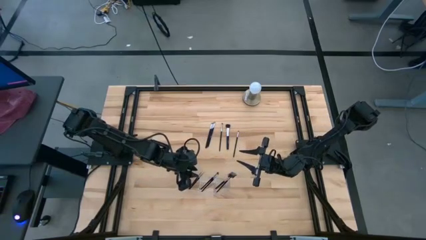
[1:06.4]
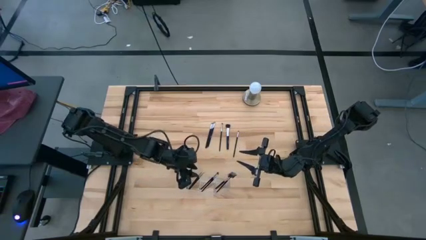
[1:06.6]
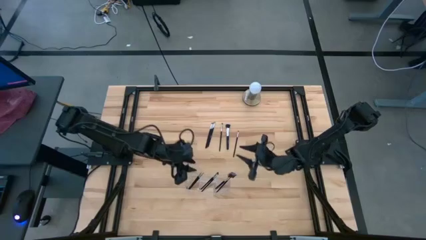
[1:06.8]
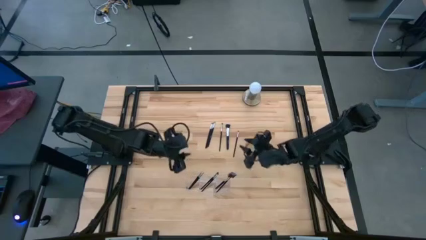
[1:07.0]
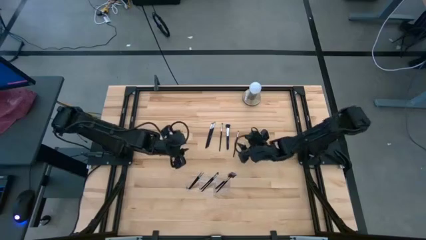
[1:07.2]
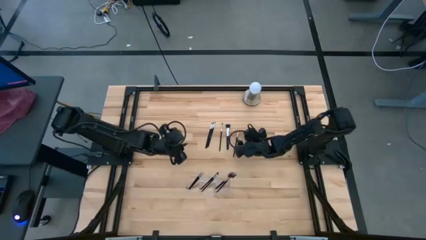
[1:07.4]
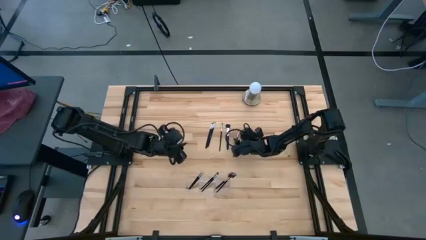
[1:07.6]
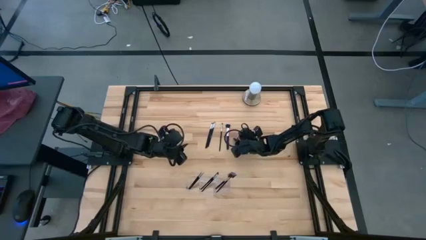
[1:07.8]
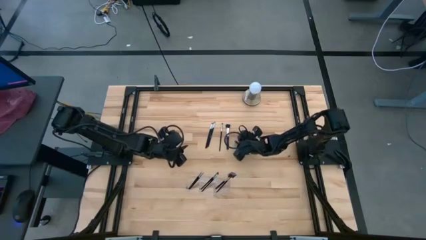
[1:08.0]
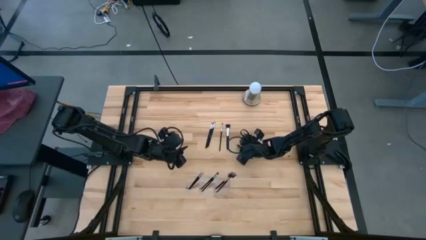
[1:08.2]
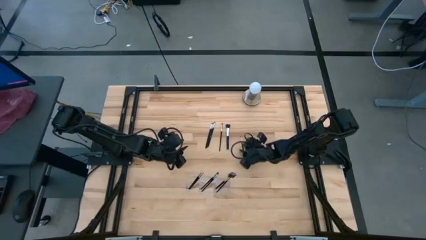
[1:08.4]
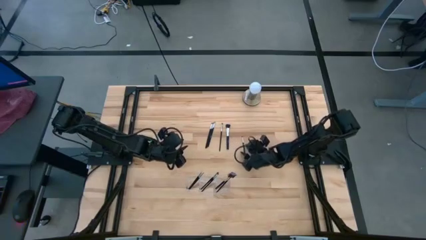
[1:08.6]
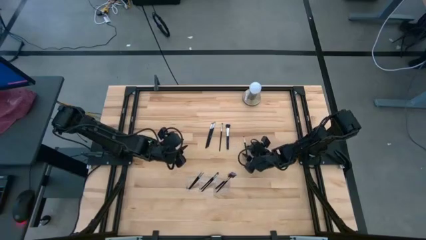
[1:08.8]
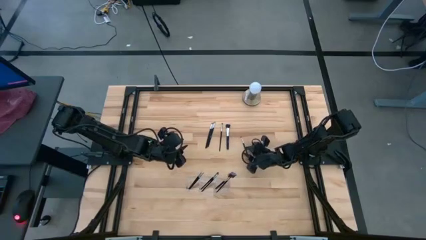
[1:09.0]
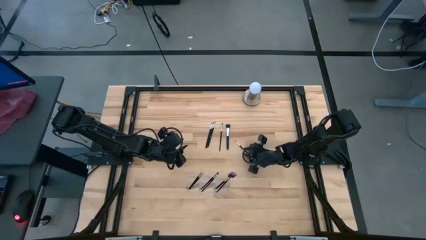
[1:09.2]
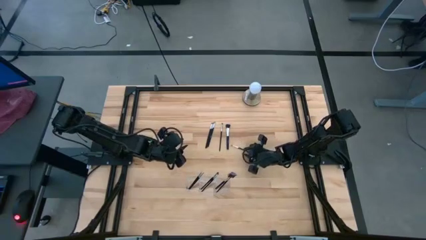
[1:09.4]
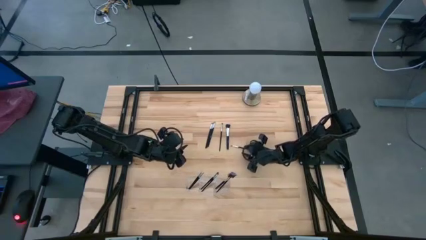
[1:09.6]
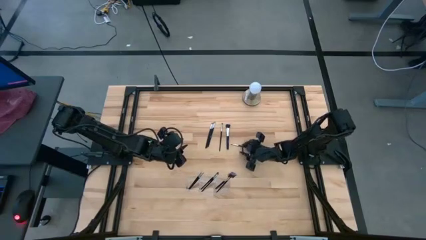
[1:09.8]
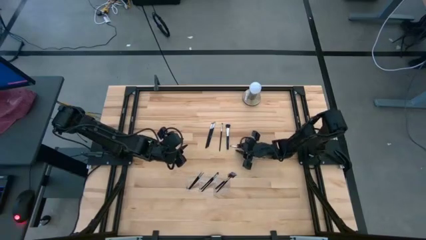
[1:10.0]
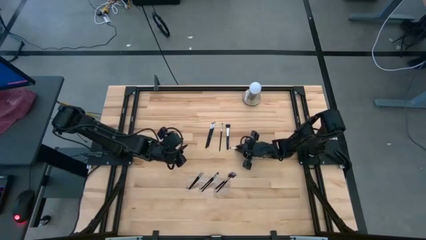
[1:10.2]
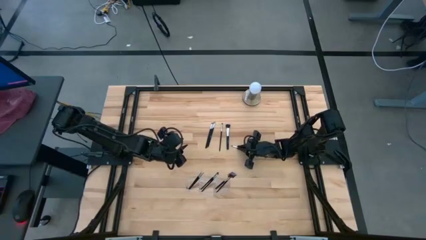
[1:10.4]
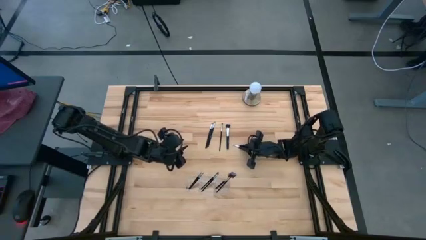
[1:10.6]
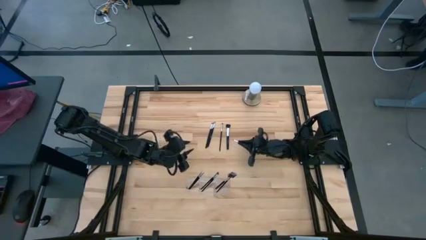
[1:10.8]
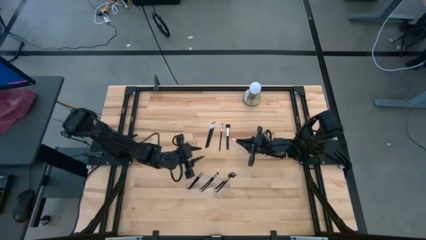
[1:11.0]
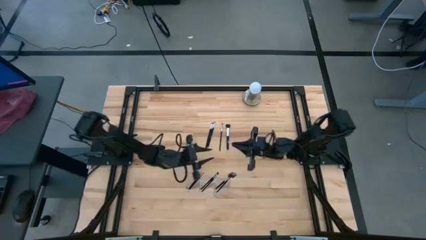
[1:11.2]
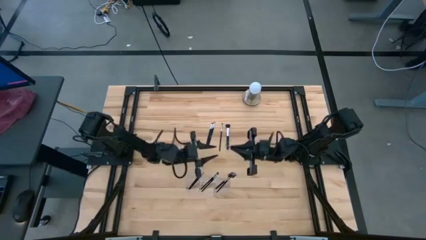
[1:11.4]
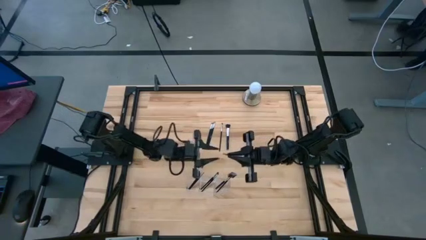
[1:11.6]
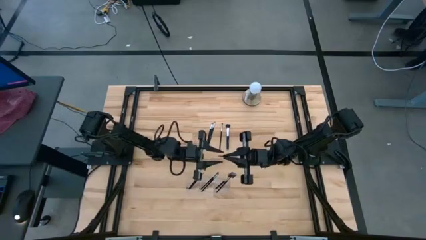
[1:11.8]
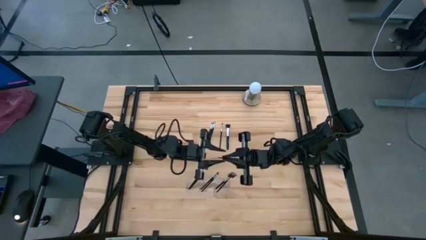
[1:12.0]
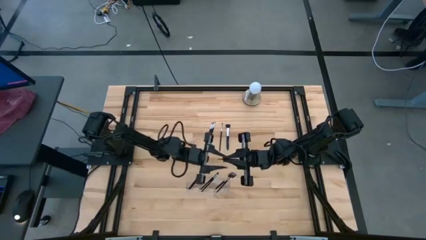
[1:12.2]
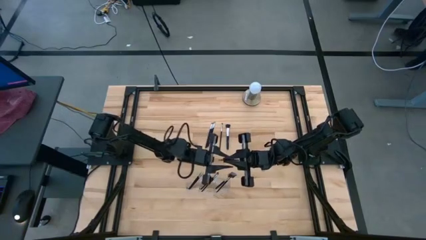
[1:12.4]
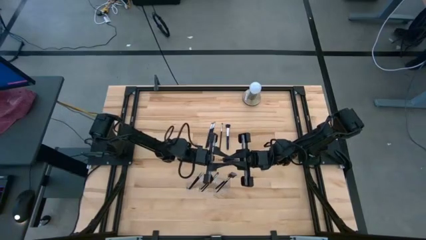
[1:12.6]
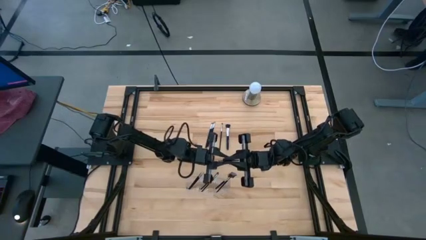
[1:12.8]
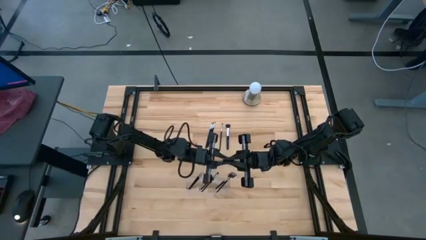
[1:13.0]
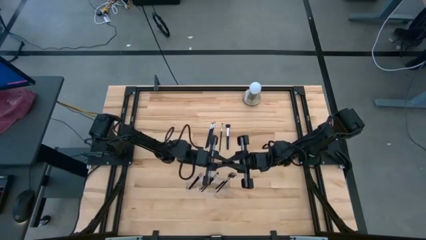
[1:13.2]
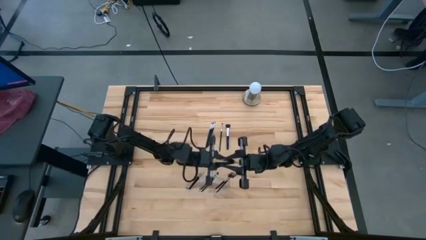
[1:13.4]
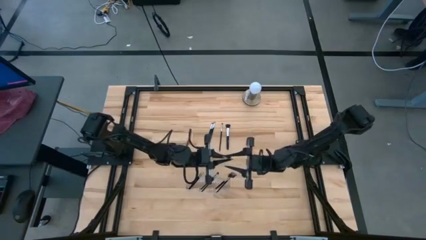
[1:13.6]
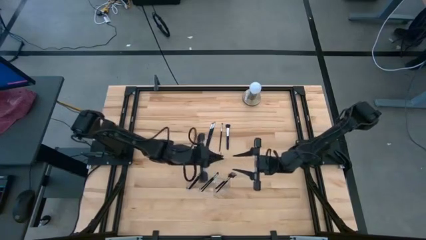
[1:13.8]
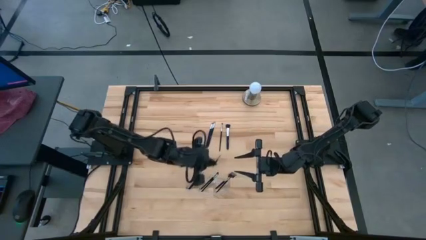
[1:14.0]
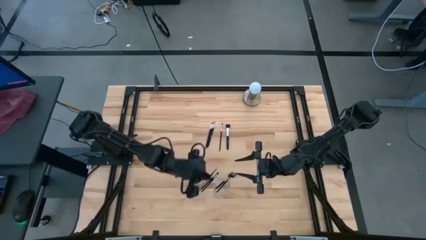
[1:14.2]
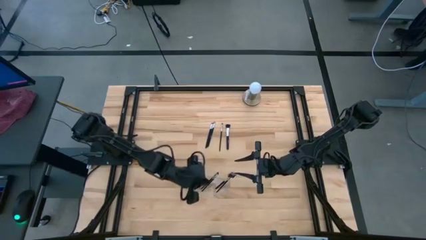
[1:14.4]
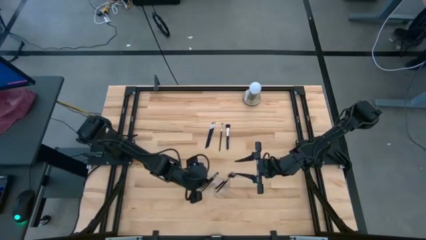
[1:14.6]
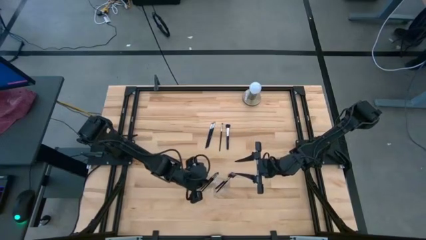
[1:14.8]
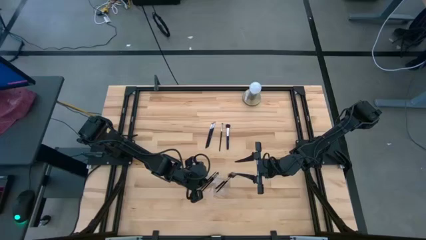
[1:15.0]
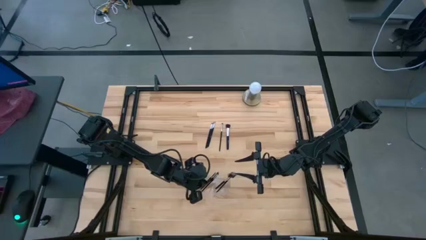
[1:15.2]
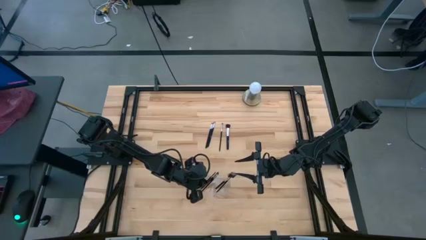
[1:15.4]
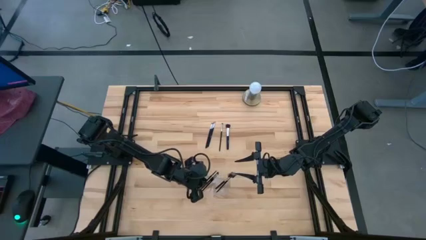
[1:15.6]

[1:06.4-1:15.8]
Task: Put items in baskets/containers
Put the black eyeshadow brush into the transparent organizer

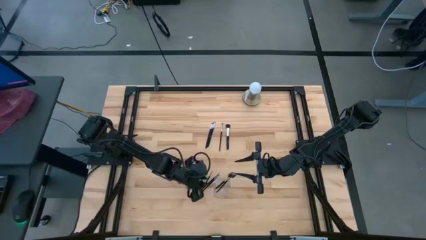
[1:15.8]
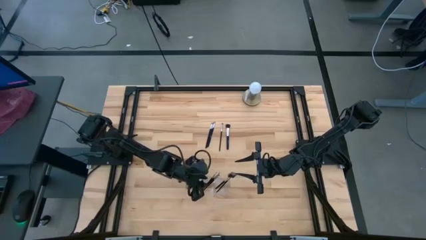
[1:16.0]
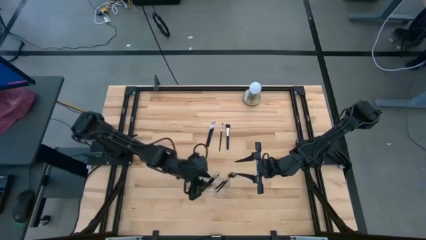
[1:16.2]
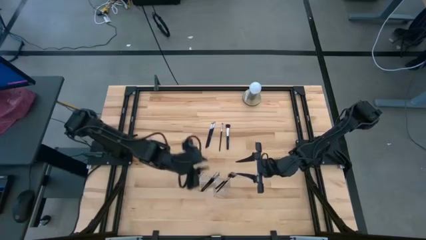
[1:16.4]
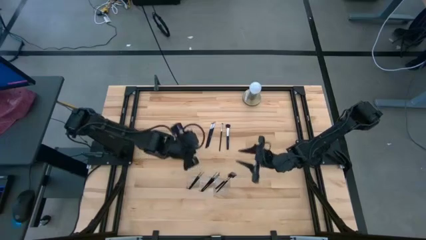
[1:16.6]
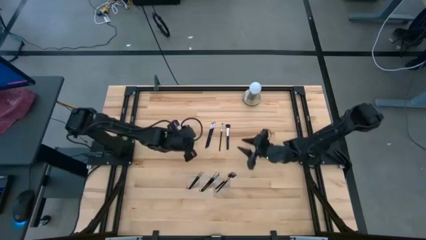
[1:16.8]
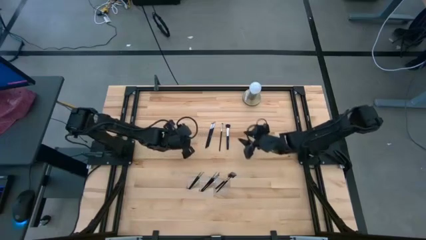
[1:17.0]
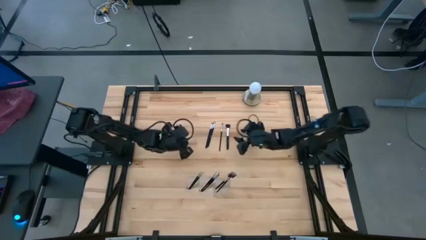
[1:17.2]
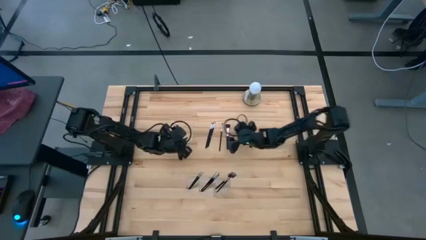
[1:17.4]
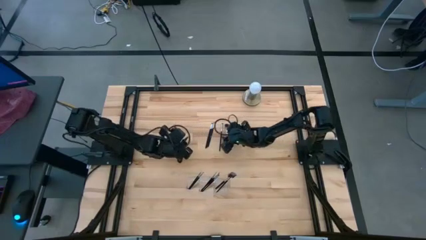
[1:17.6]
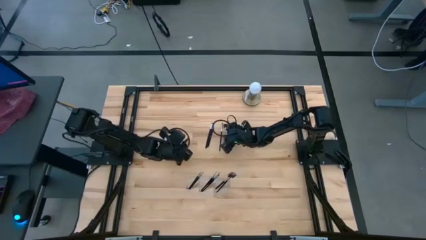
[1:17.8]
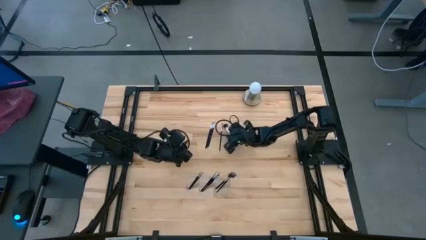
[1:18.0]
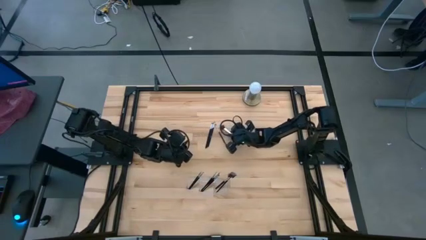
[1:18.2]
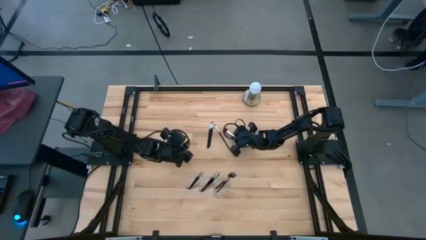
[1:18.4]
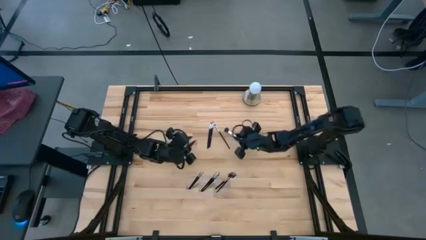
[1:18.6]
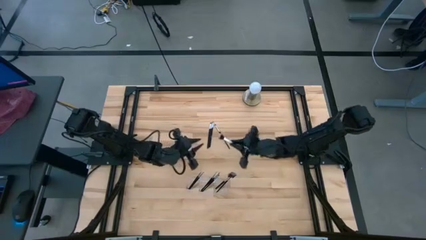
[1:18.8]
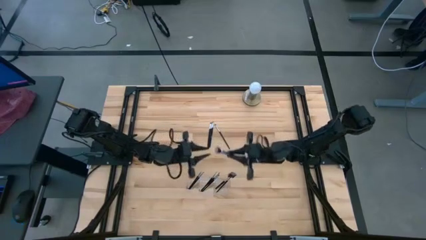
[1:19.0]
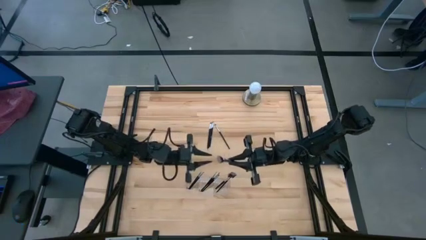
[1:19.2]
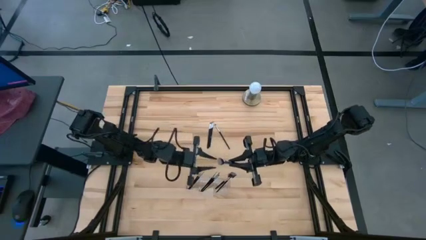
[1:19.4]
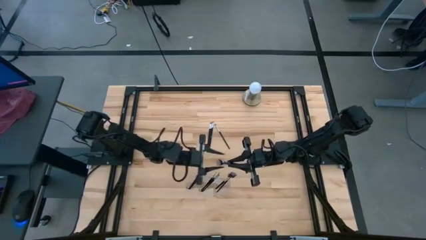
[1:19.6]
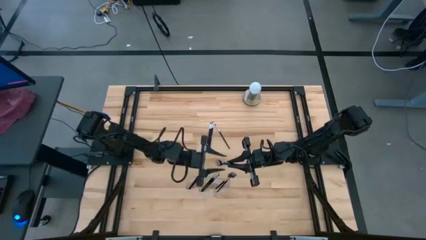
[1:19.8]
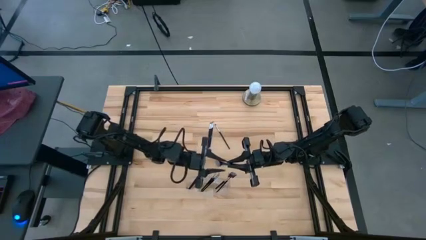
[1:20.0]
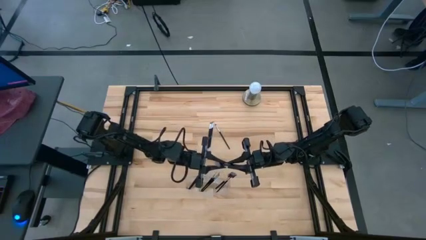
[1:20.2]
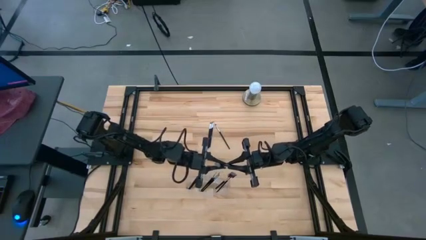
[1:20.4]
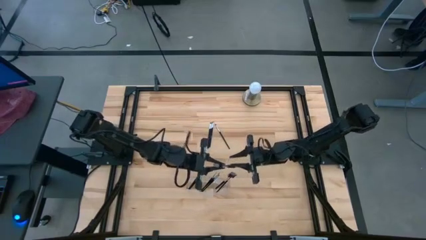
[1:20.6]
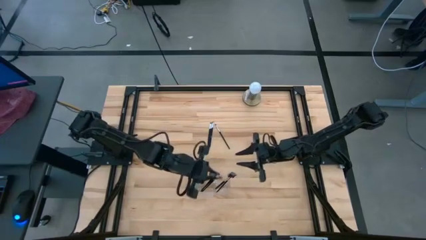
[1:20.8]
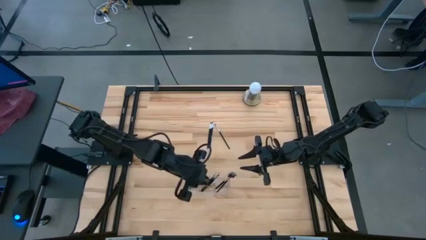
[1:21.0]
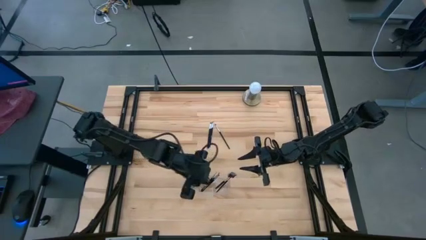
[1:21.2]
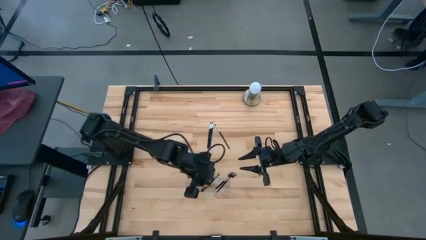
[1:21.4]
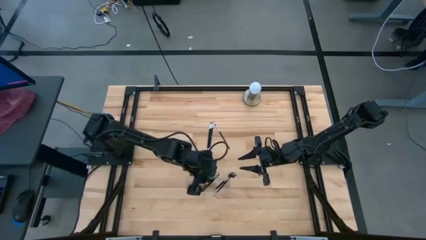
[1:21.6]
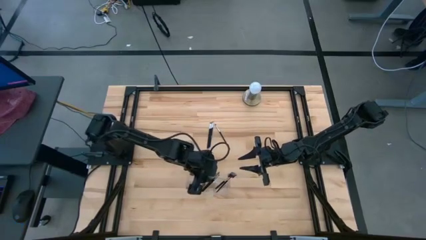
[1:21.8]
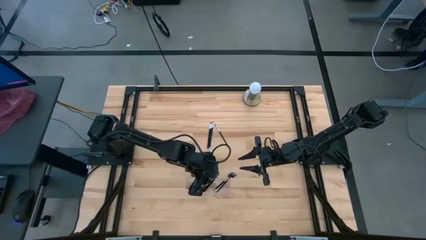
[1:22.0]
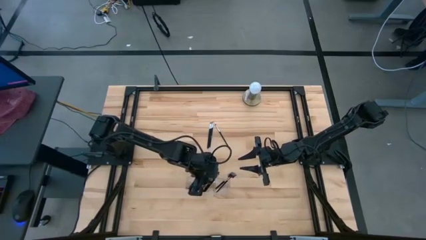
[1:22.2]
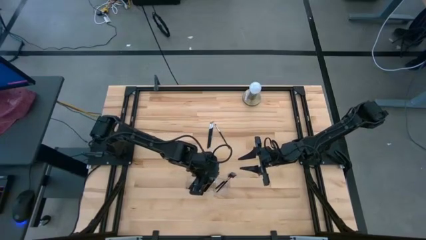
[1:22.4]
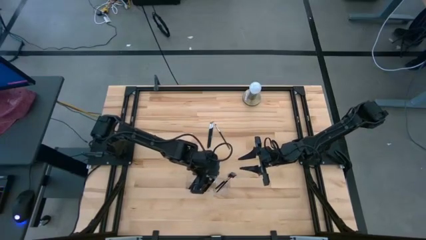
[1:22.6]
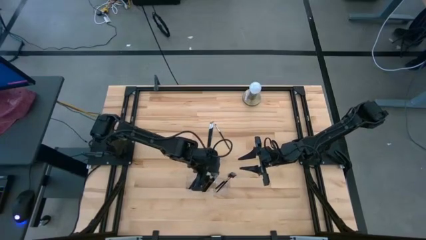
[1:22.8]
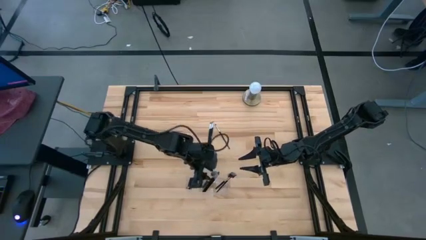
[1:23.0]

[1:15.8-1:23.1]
Put the black powder brush into the transparent organizer
